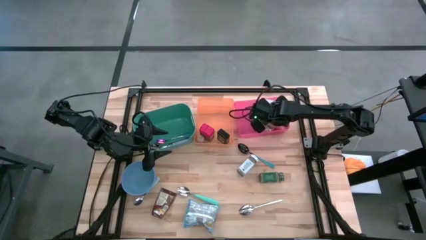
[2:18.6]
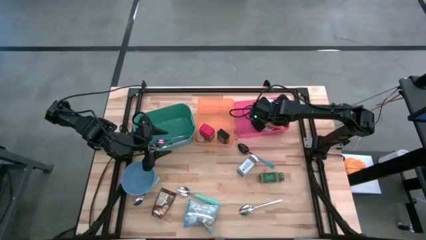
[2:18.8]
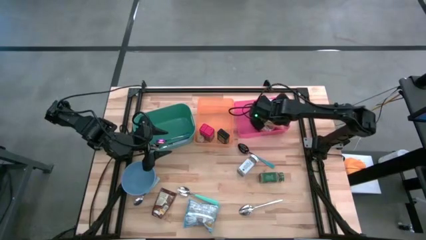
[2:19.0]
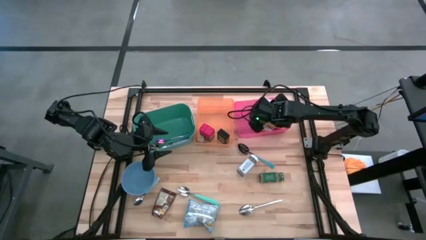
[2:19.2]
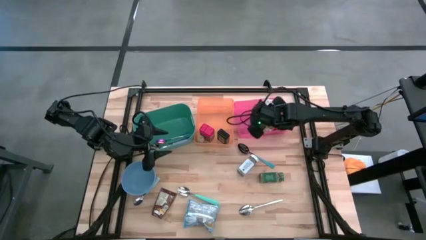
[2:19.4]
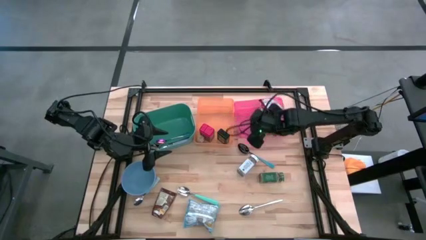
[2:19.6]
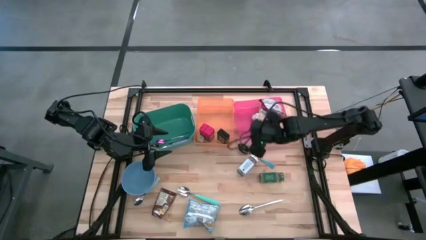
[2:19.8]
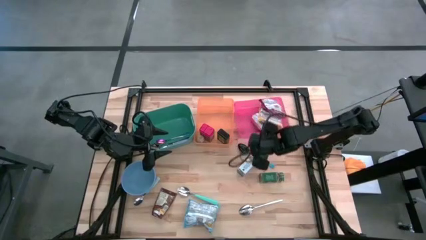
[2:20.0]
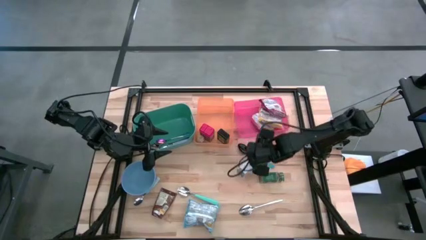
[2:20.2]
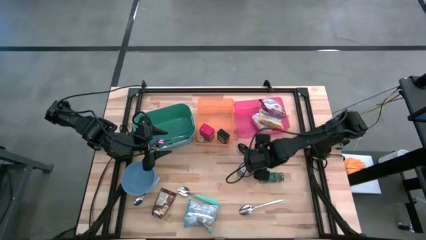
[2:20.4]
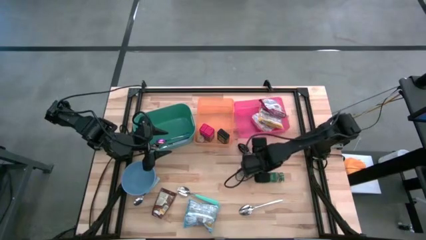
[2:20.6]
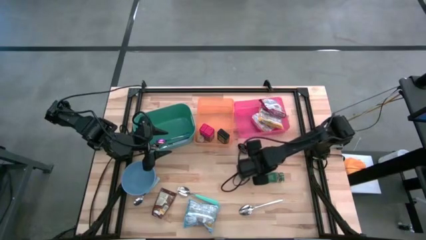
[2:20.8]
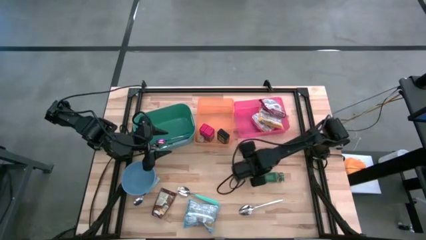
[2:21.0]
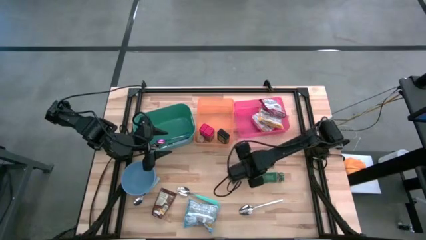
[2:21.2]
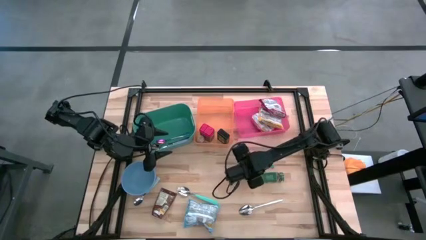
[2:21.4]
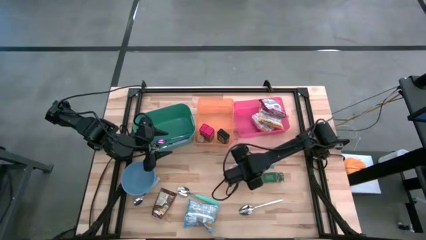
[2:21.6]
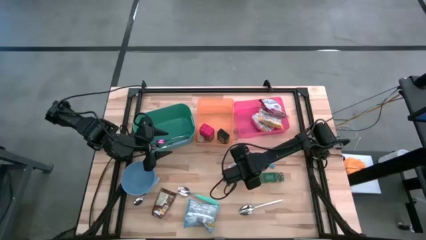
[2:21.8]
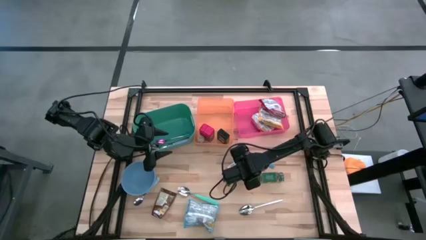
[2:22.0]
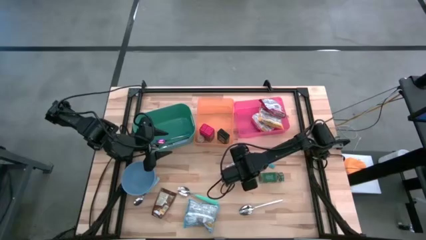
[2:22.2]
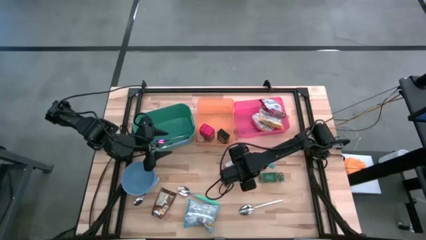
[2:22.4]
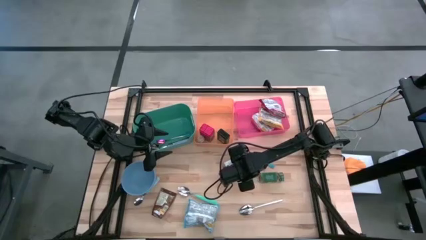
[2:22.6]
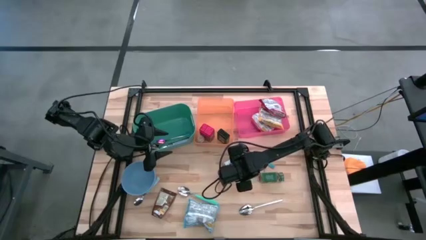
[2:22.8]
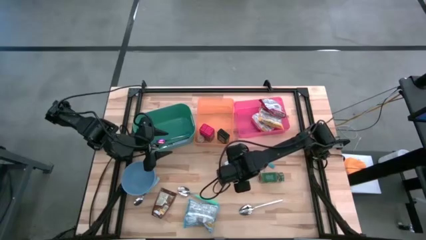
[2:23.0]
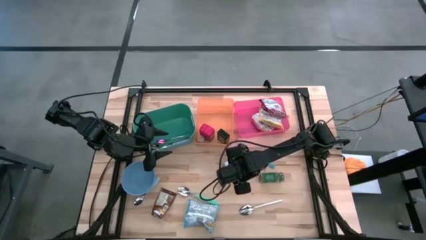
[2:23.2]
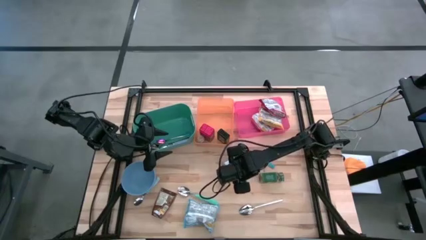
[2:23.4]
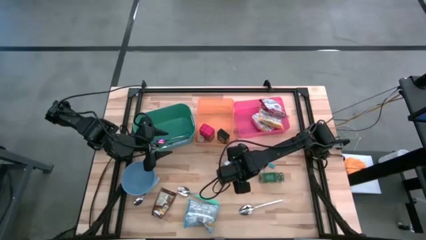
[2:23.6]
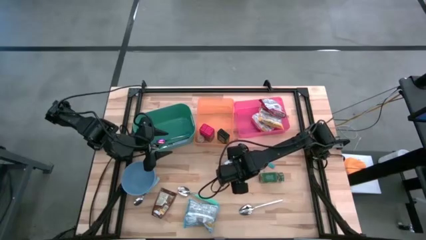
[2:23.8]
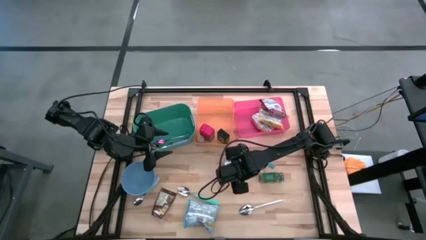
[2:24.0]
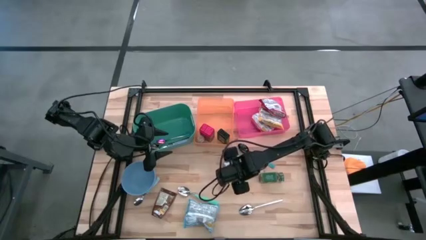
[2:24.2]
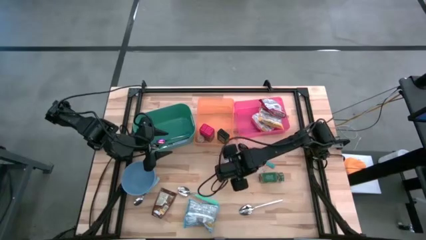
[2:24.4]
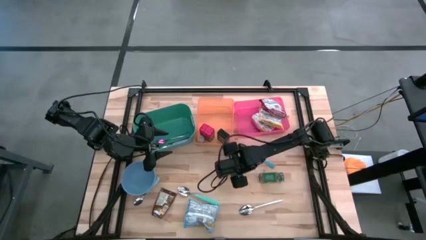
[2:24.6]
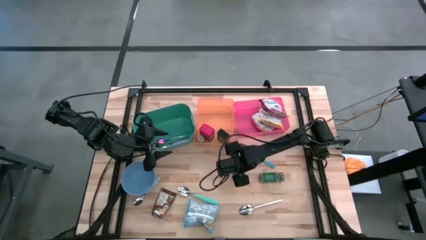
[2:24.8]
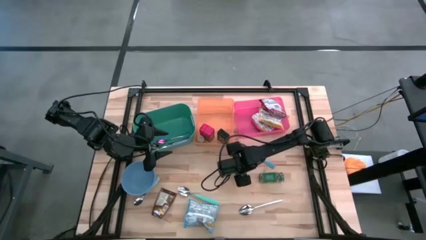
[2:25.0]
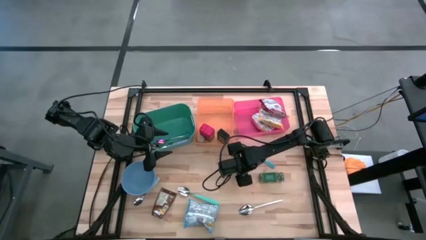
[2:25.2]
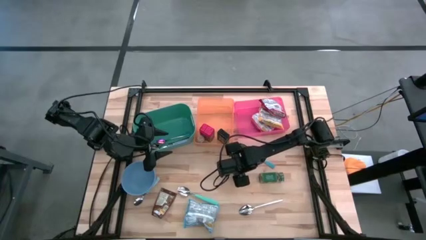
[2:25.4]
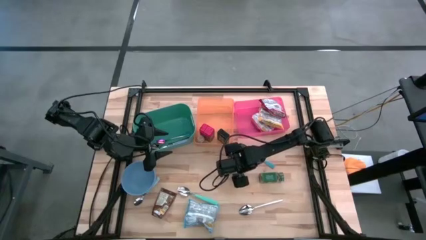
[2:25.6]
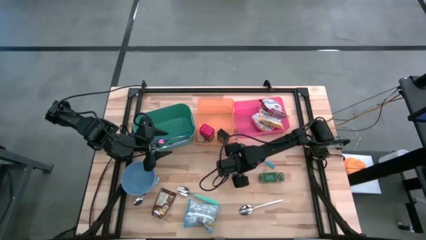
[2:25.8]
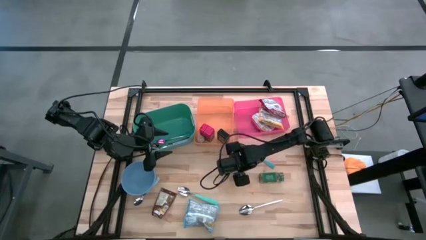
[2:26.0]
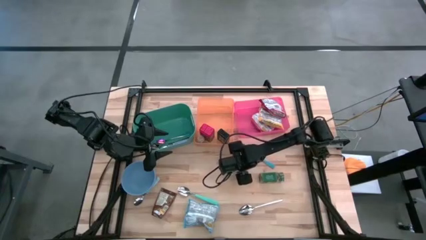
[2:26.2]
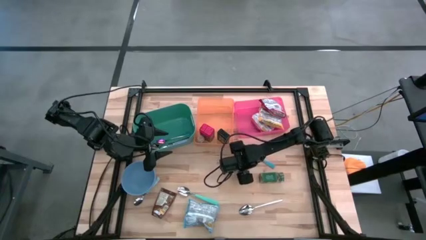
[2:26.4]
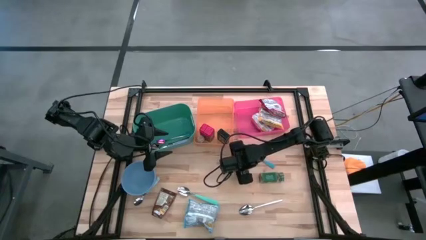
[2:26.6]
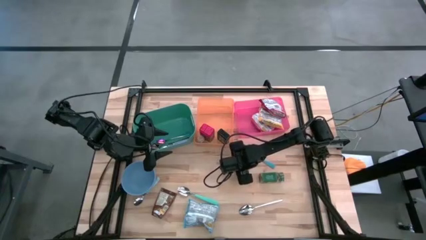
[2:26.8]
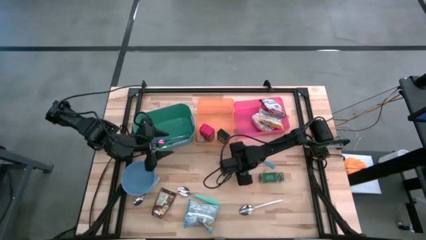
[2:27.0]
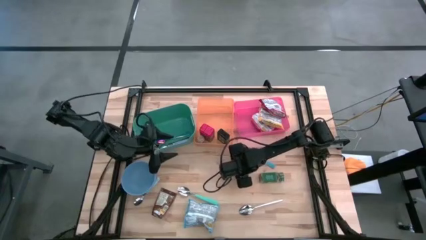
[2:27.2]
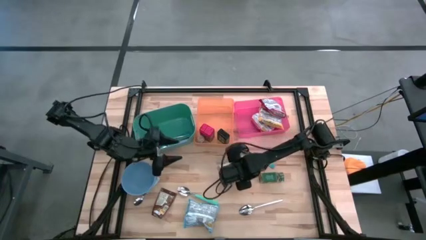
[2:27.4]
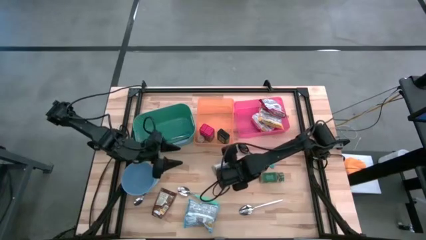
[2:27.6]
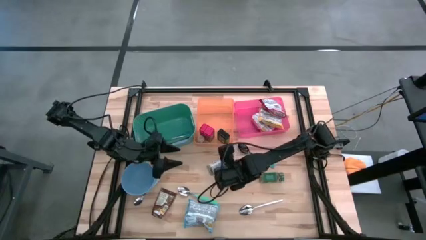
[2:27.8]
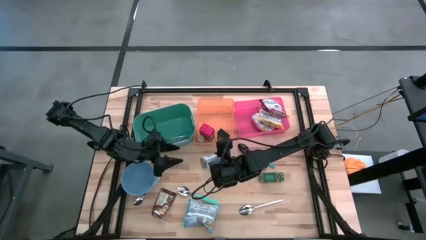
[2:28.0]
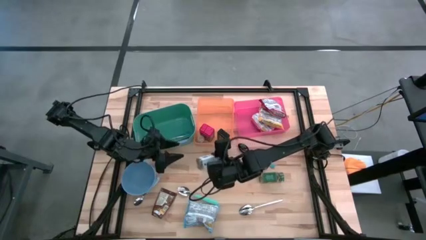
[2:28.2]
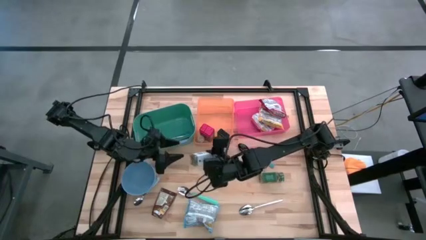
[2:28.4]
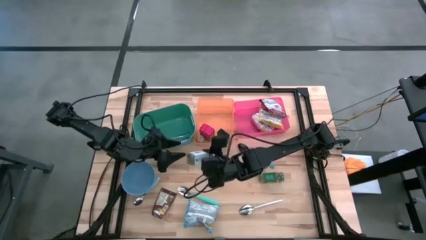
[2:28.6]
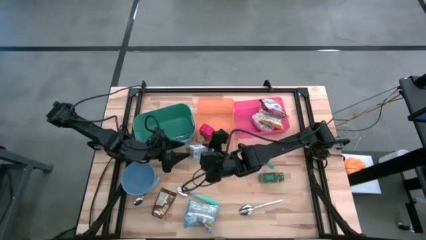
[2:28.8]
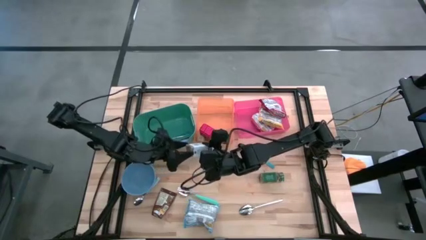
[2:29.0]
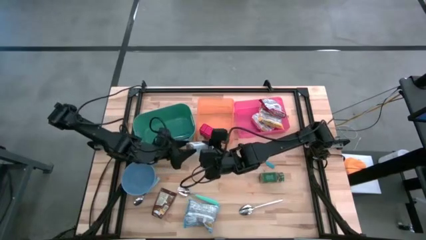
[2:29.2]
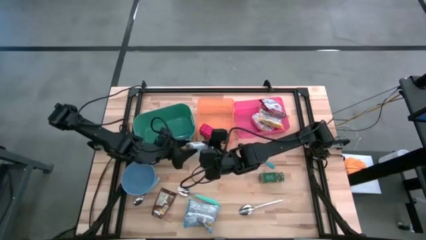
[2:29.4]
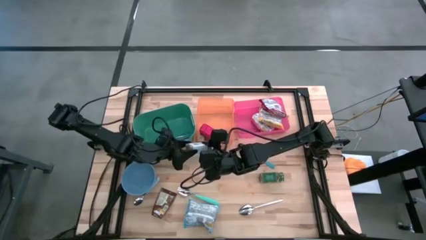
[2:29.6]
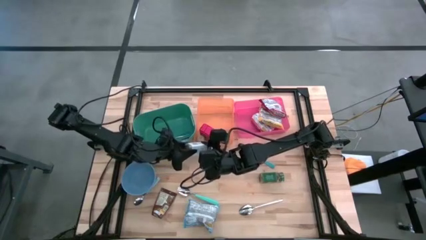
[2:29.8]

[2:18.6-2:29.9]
Put the white seasoning bottle into the orange bin

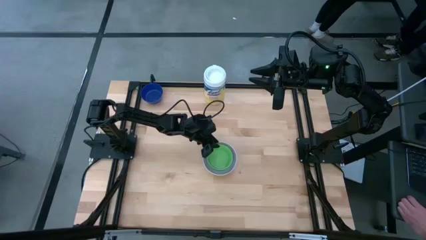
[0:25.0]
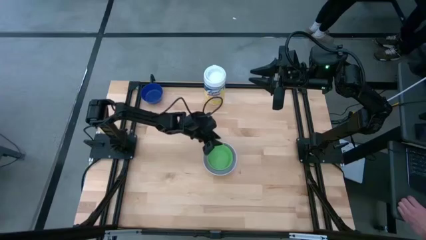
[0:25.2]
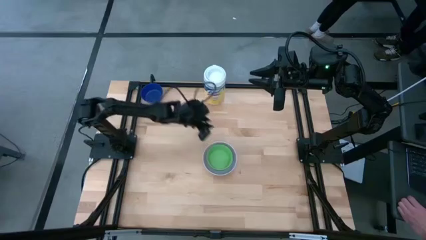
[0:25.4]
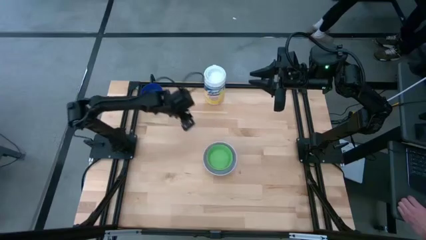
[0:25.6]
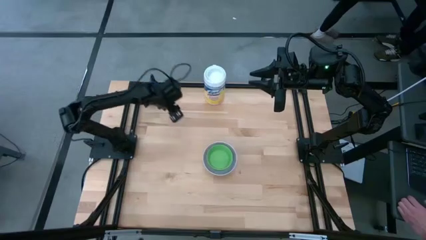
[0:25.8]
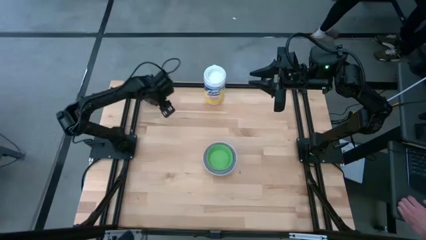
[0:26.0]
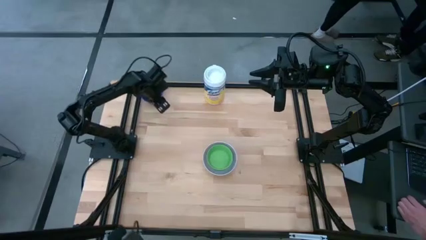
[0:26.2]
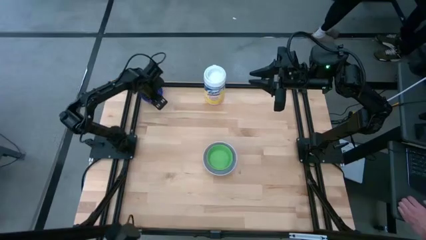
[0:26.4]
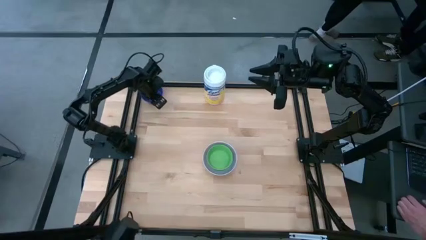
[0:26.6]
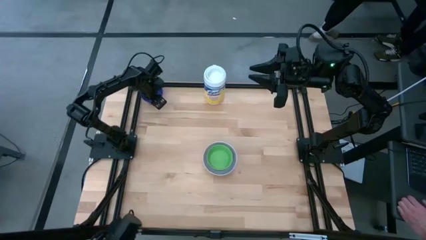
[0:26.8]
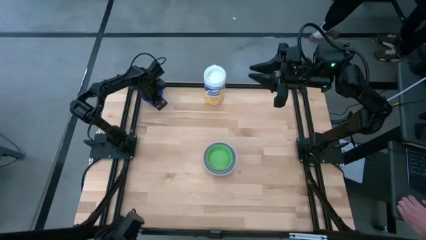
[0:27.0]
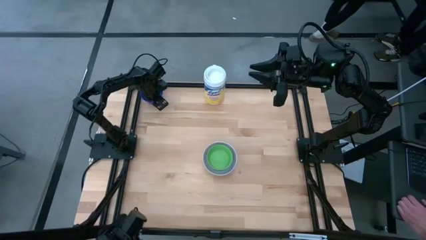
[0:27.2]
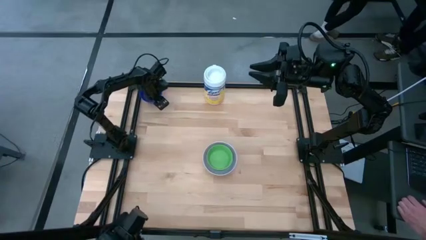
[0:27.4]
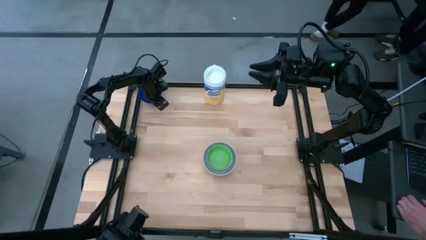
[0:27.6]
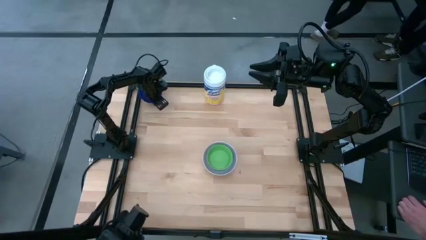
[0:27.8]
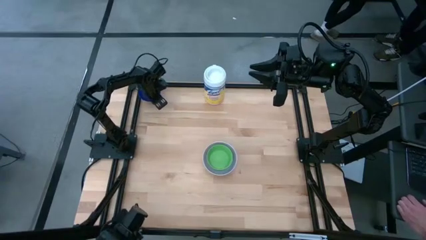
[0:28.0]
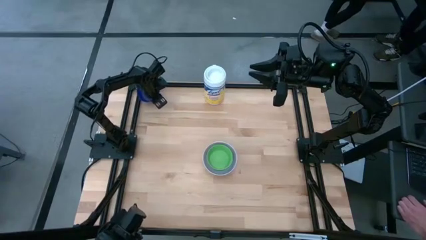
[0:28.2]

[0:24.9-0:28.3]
Stack the dark blue bowl on top of the green bowl

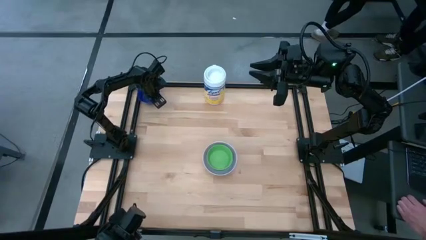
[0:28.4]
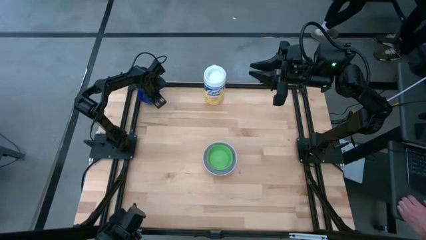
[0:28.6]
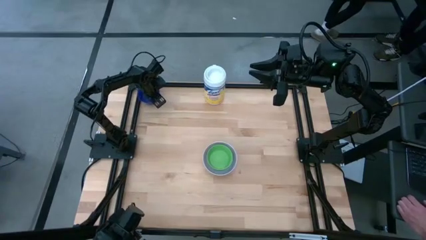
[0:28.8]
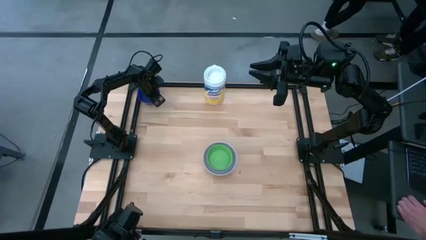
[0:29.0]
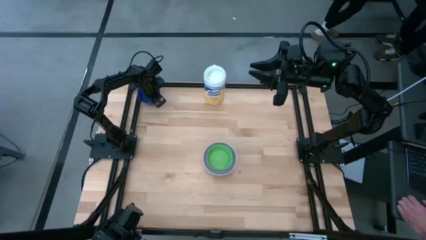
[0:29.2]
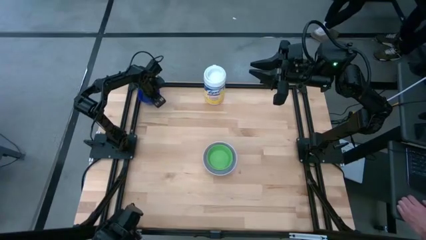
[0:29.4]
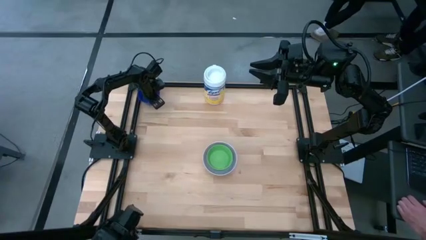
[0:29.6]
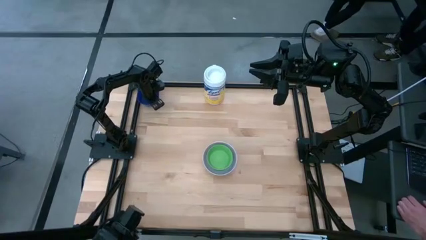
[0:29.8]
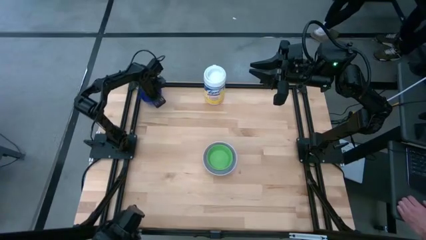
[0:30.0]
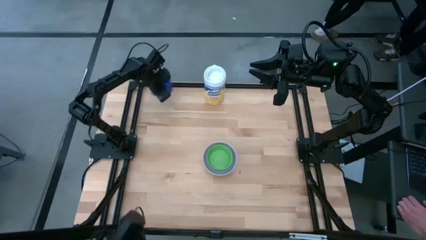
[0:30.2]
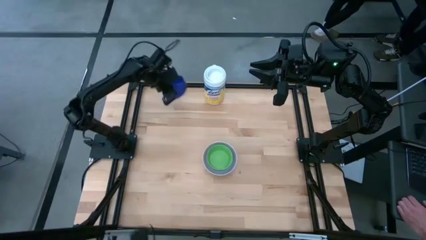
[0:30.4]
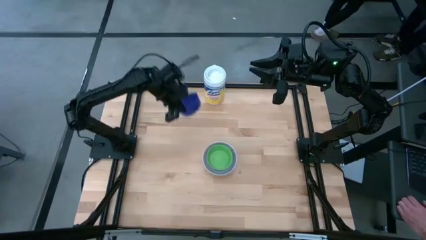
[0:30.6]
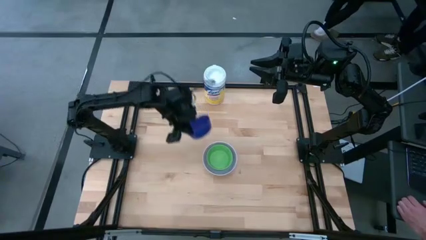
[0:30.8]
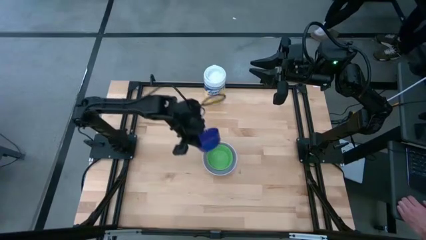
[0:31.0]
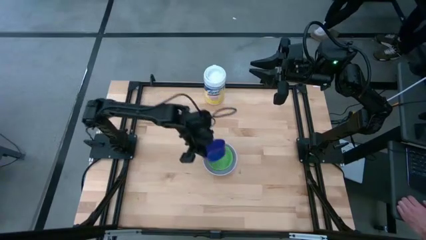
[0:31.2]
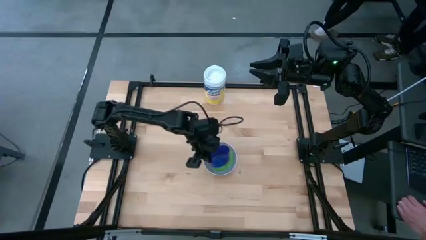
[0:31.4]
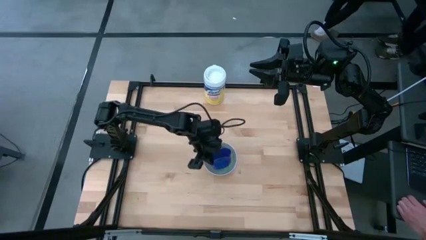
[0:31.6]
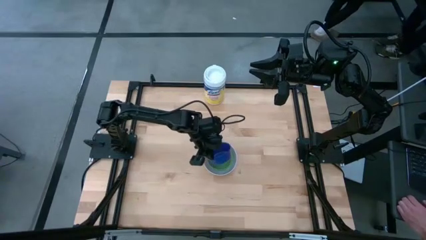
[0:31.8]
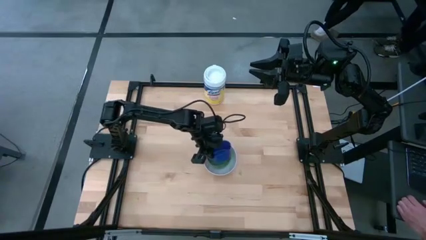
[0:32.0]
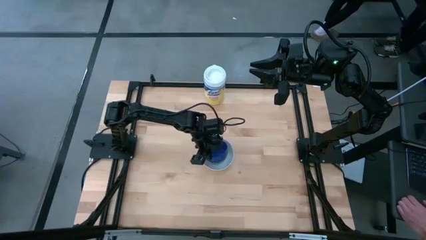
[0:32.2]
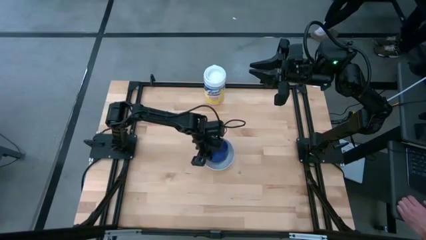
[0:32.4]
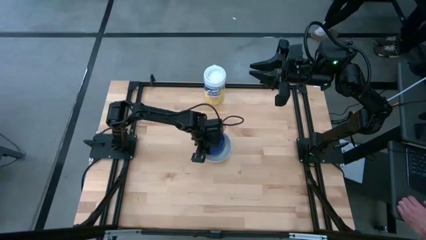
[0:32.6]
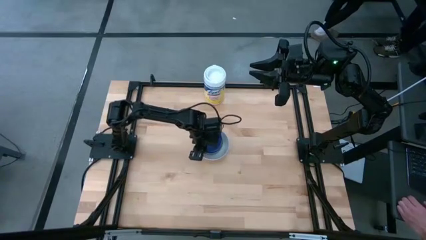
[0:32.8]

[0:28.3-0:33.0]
Stack the dark blue bowl on top of the green bowl
